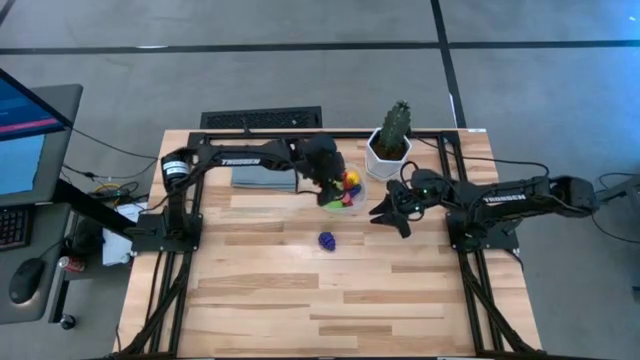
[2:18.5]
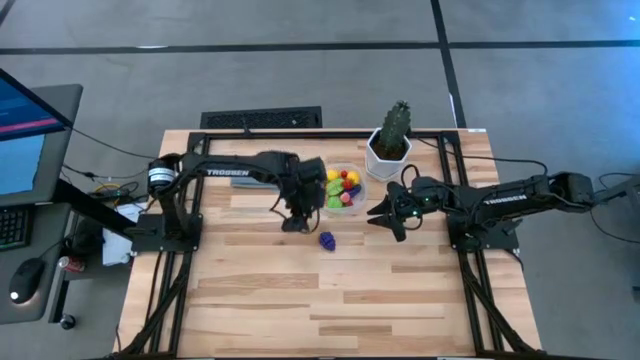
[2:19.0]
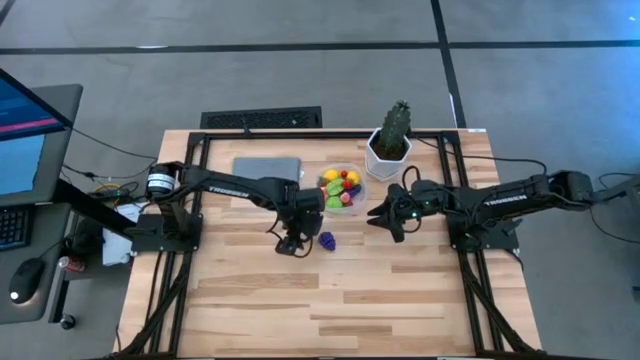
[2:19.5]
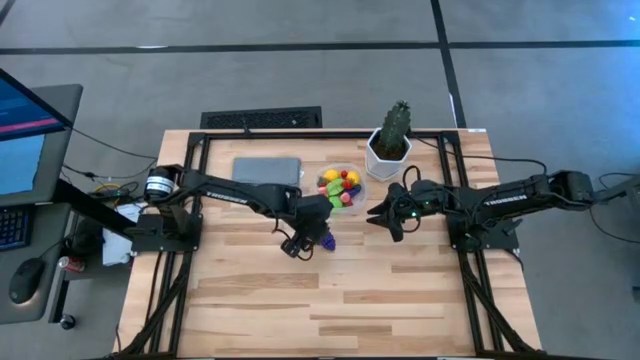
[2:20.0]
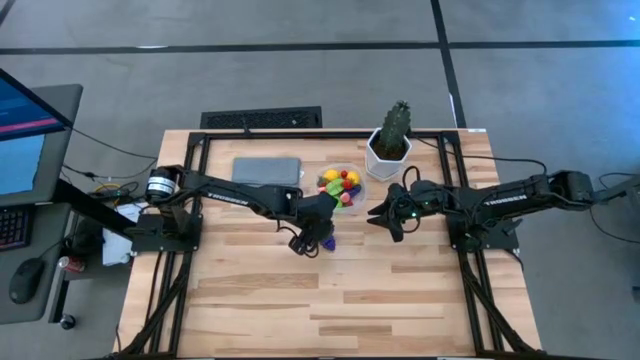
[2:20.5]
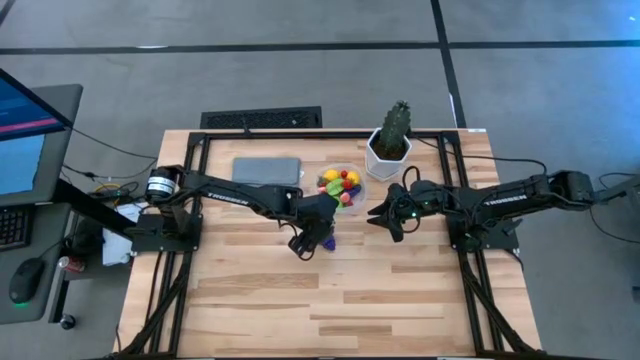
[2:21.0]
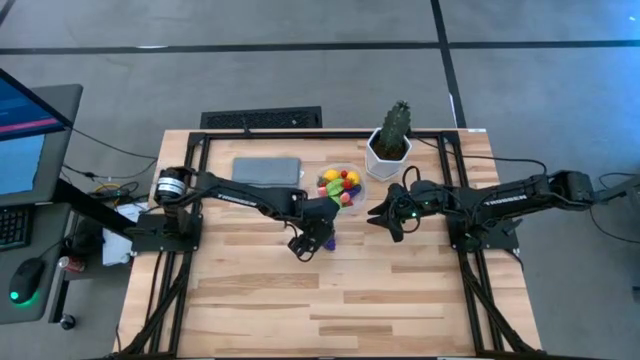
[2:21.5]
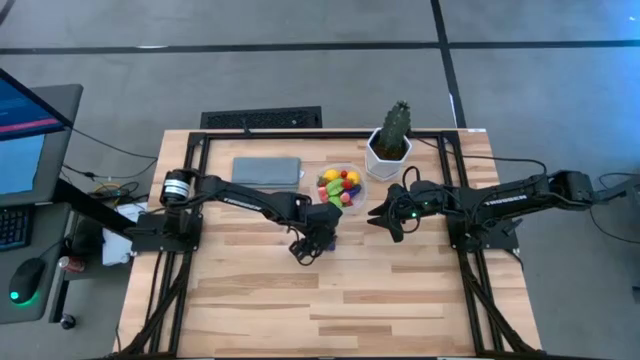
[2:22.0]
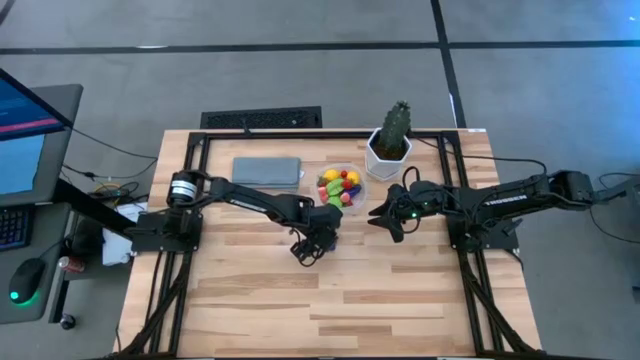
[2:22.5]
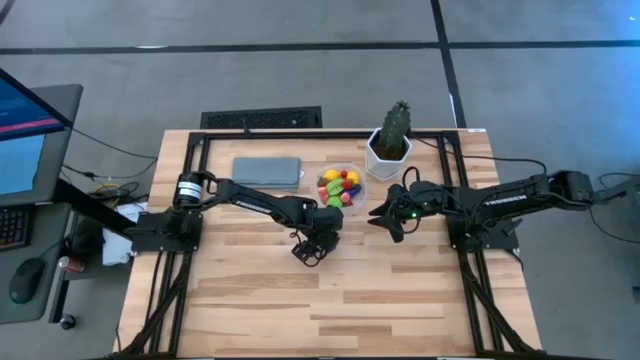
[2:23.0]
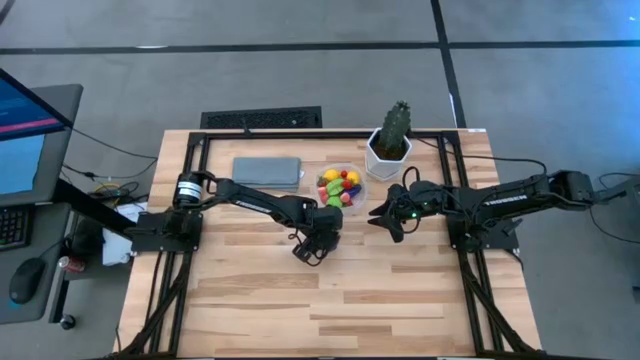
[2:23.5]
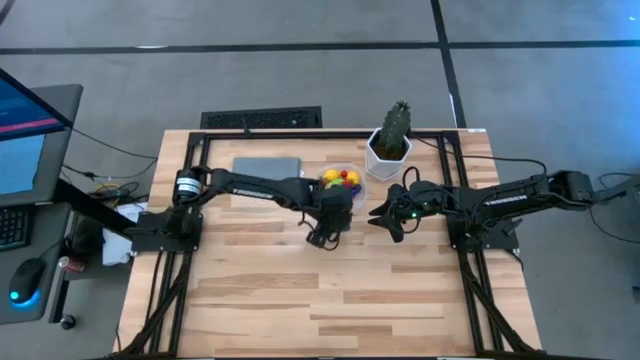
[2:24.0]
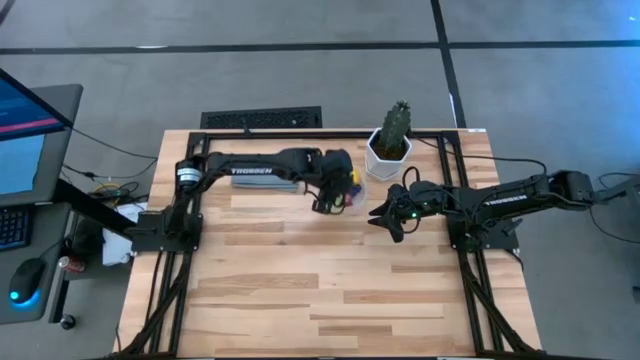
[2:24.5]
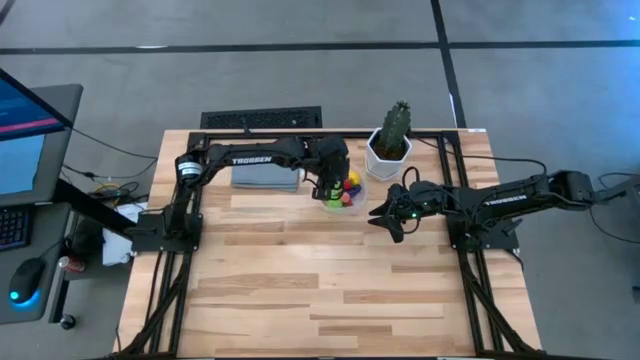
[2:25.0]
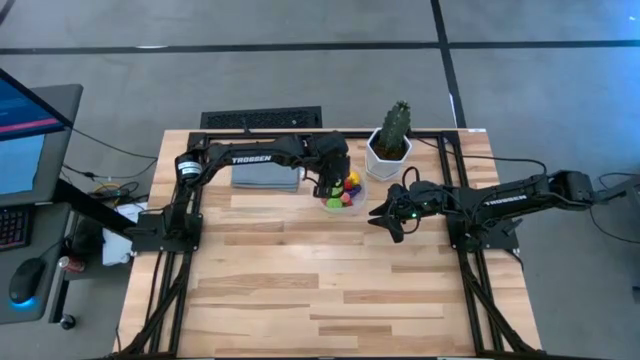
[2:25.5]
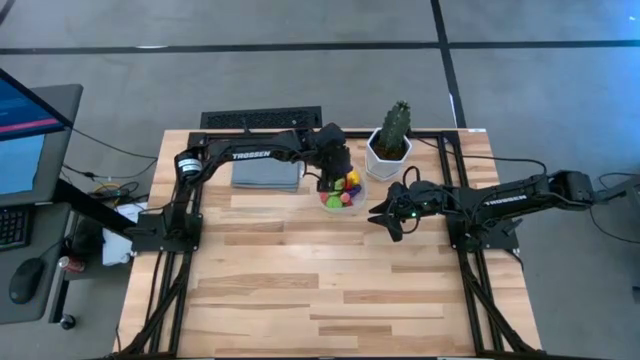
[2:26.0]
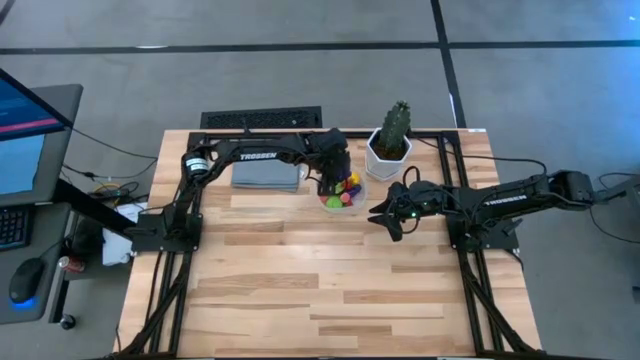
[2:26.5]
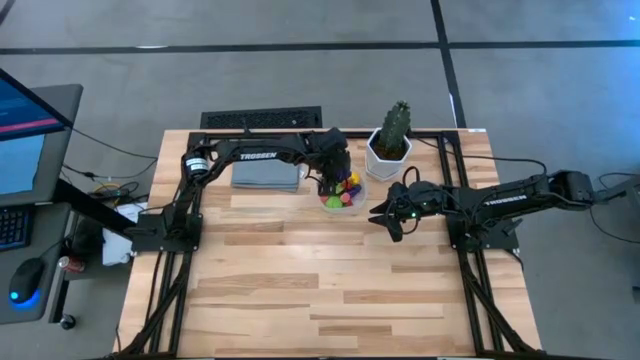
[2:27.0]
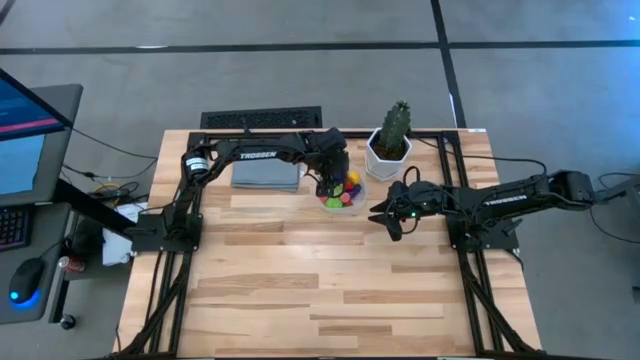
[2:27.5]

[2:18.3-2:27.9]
Task: Pick and placing Produce into tupperware
Put the grapes into the transparent bin

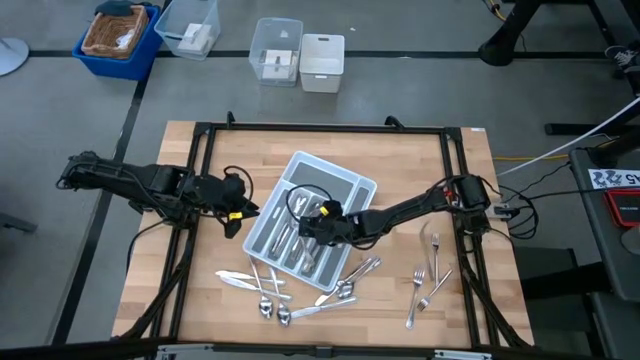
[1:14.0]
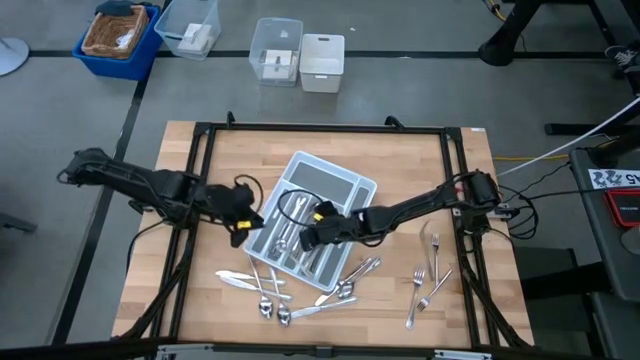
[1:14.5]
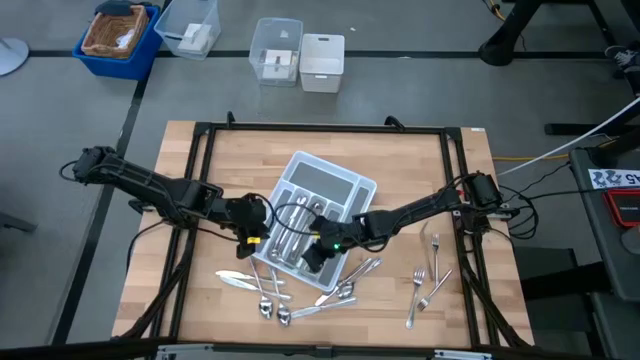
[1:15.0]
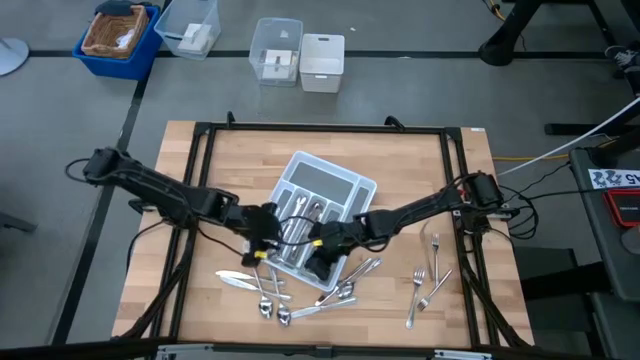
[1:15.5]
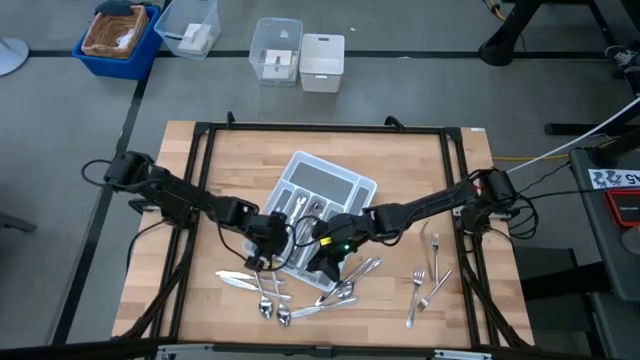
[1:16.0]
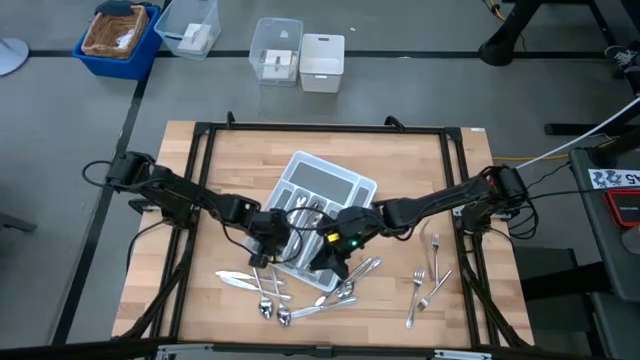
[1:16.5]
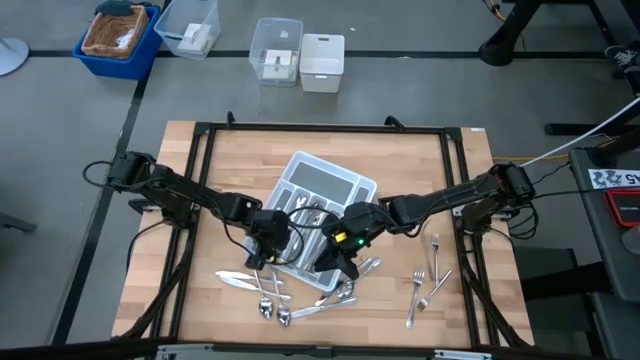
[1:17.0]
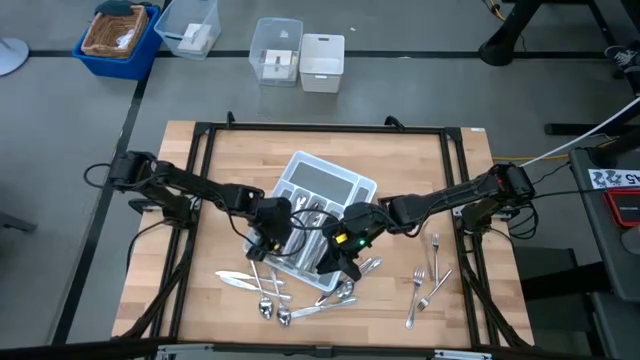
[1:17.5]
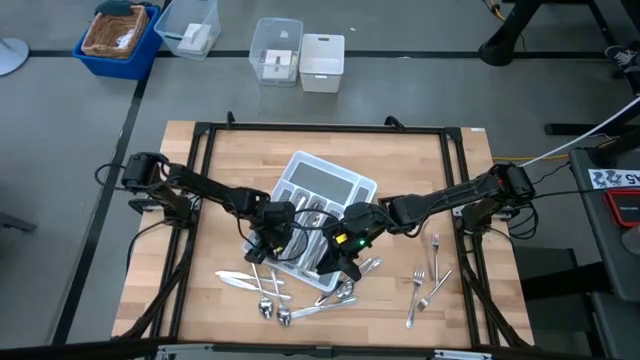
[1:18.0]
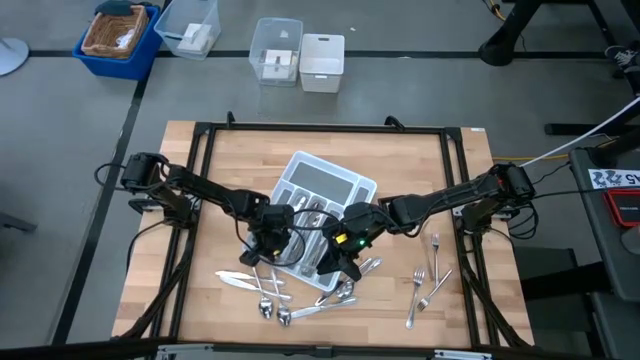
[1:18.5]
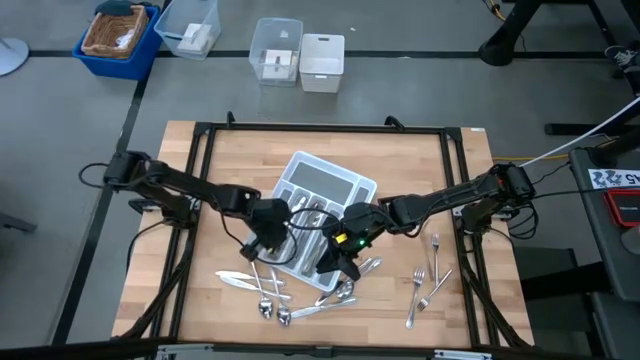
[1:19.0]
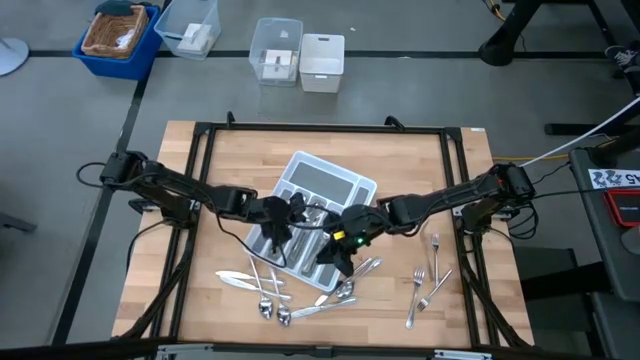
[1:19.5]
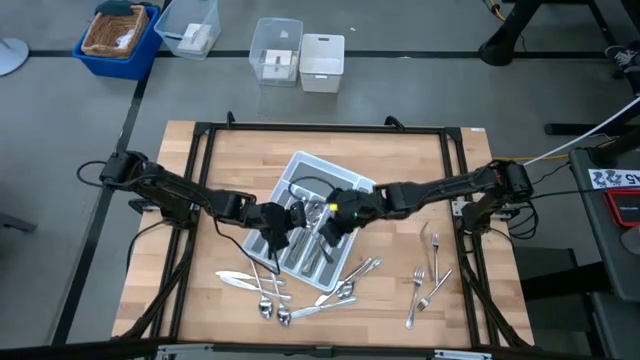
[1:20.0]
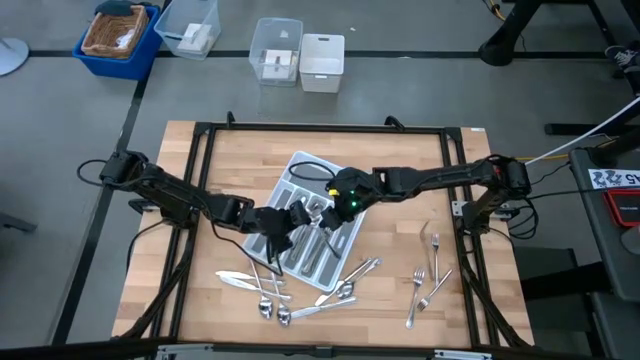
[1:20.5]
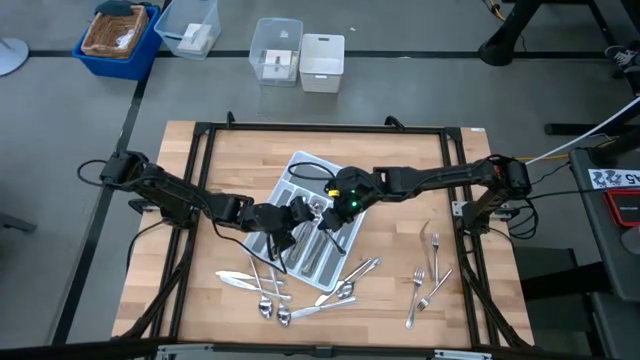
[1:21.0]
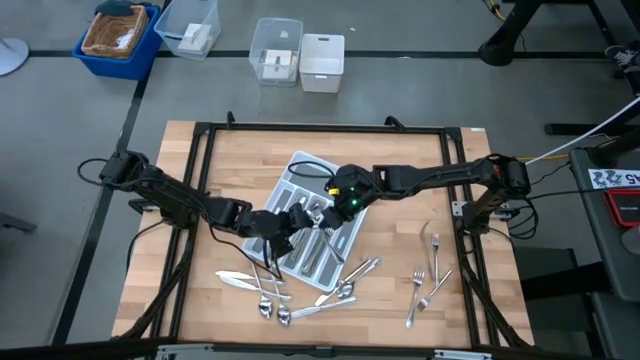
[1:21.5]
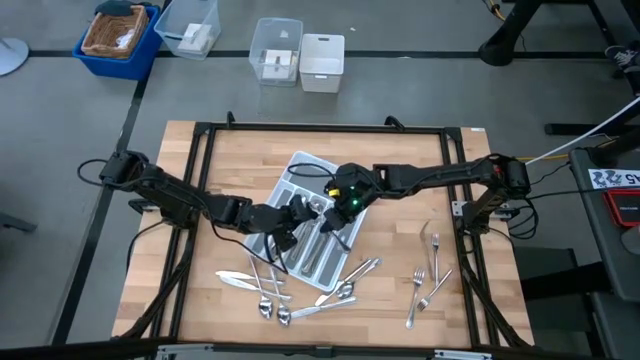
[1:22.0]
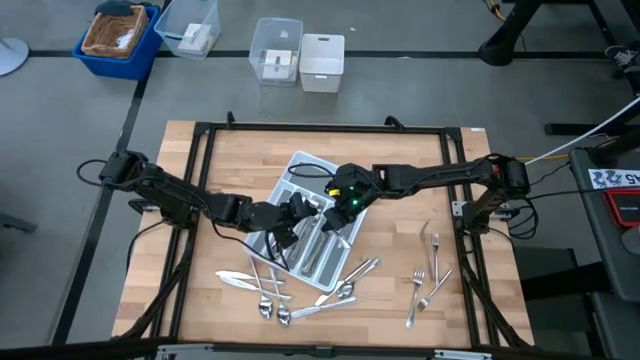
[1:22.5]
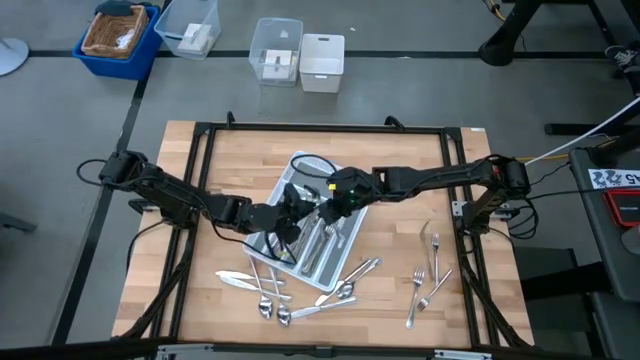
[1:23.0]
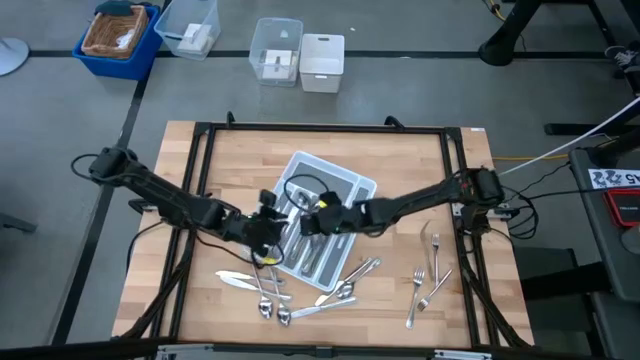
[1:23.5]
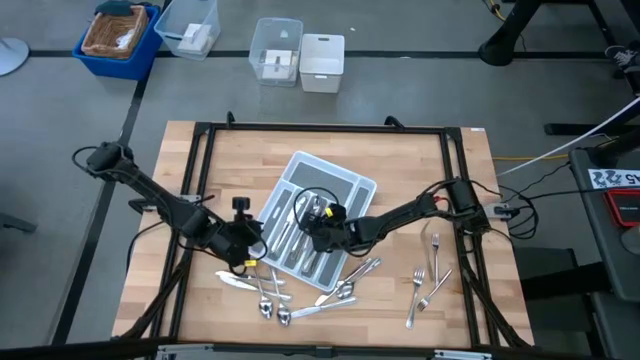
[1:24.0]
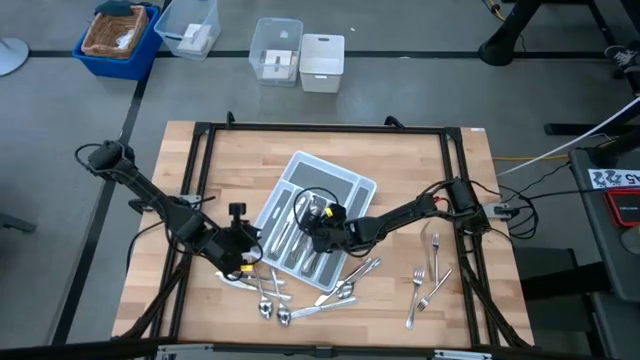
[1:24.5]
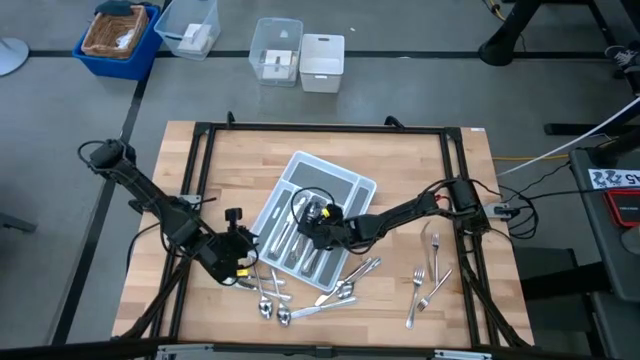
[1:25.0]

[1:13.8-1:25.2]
Task: Sort silverware
Put the silver spoon into the white cutlery tray
